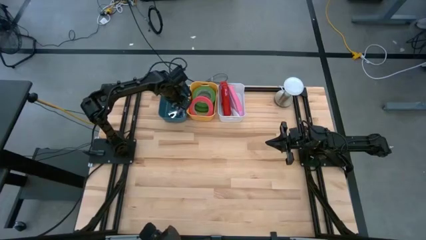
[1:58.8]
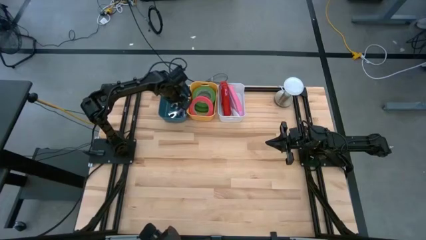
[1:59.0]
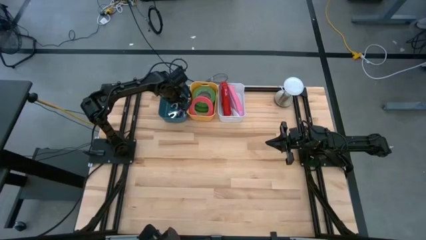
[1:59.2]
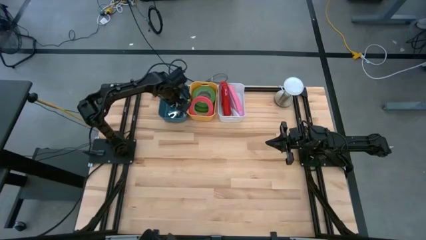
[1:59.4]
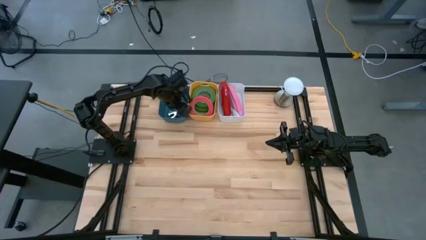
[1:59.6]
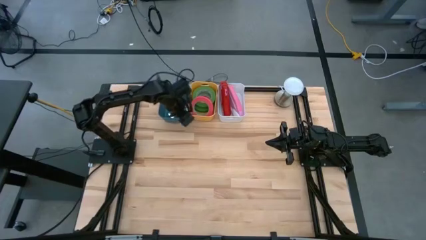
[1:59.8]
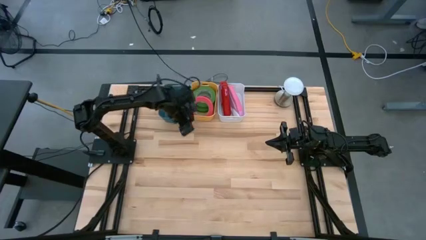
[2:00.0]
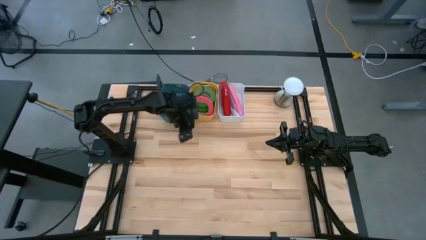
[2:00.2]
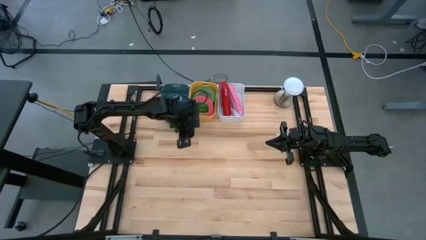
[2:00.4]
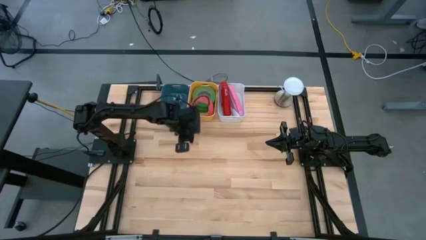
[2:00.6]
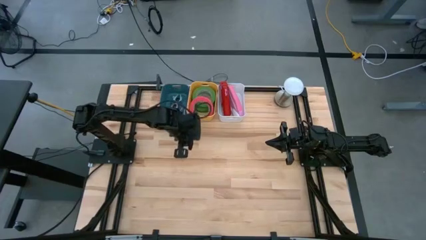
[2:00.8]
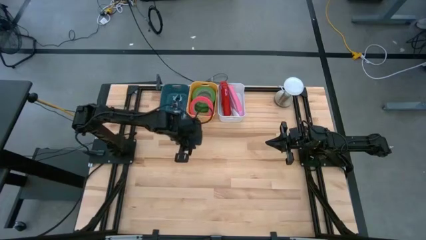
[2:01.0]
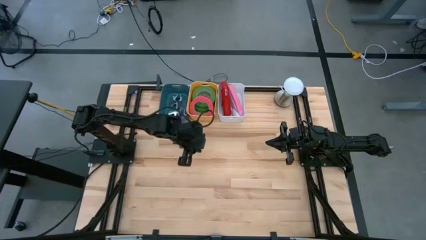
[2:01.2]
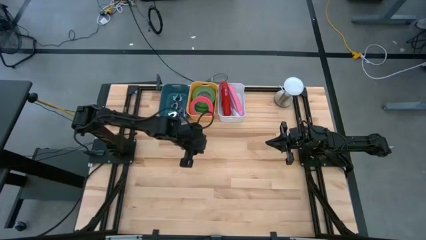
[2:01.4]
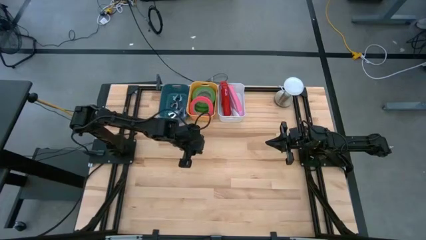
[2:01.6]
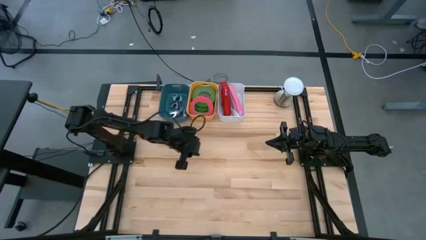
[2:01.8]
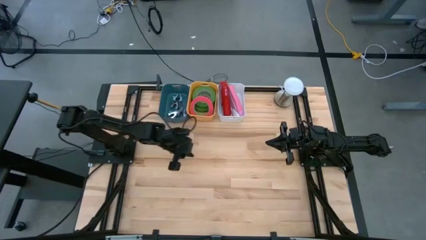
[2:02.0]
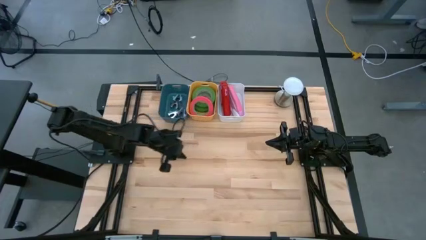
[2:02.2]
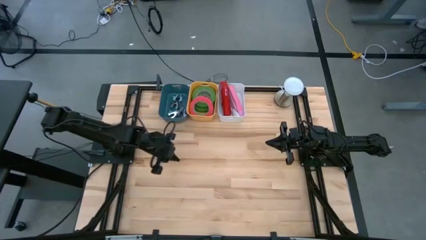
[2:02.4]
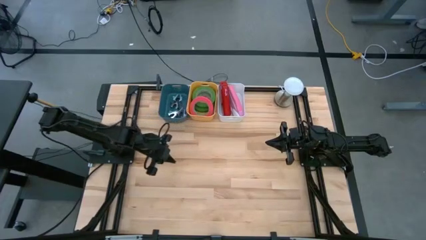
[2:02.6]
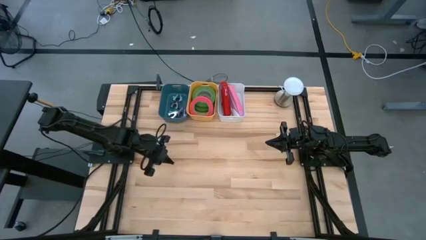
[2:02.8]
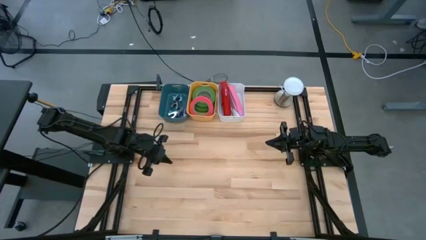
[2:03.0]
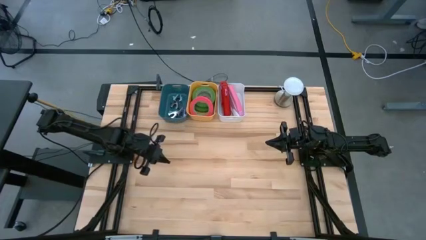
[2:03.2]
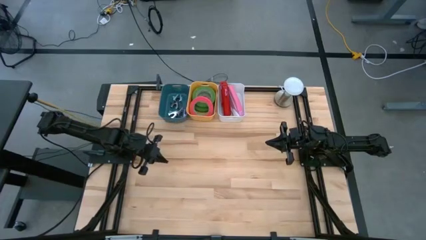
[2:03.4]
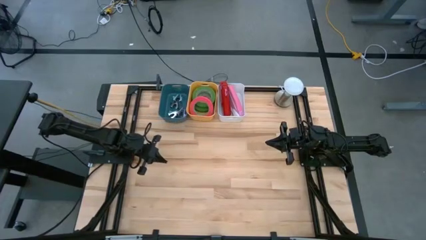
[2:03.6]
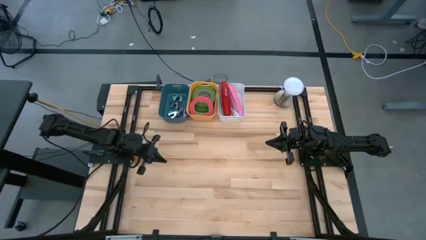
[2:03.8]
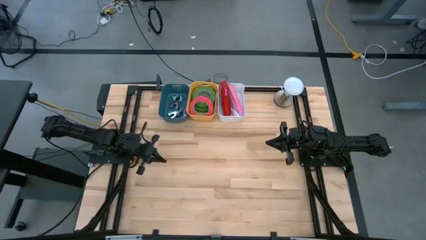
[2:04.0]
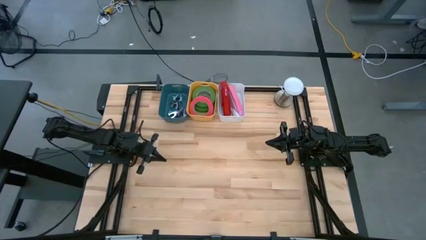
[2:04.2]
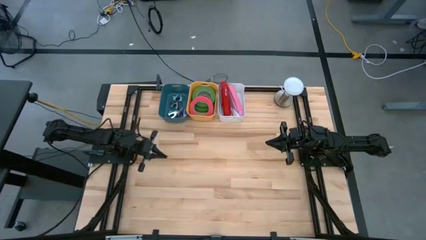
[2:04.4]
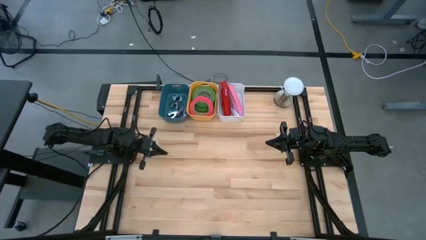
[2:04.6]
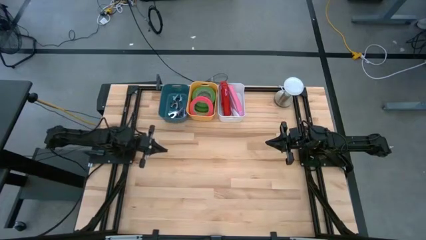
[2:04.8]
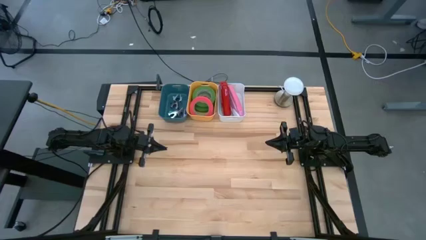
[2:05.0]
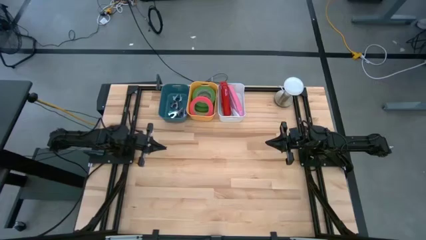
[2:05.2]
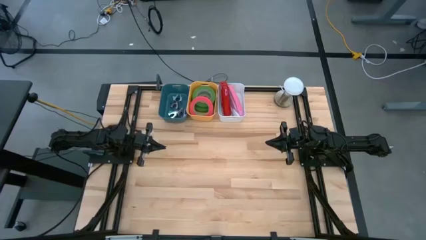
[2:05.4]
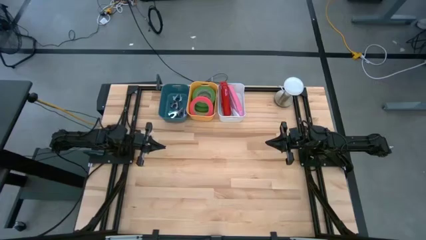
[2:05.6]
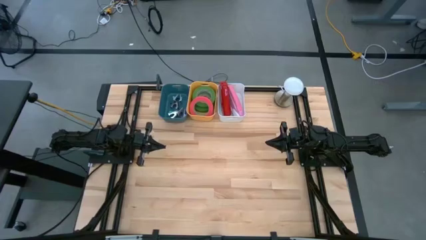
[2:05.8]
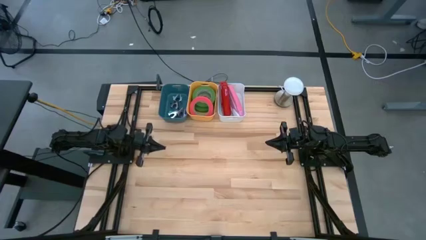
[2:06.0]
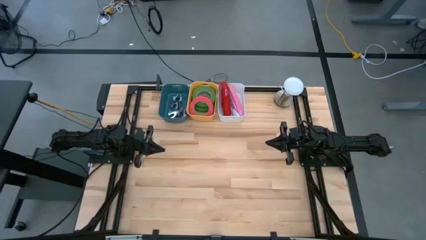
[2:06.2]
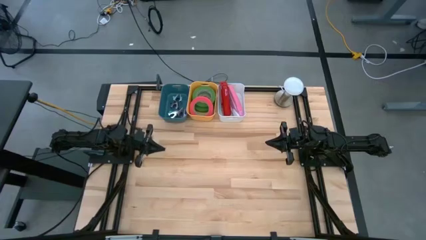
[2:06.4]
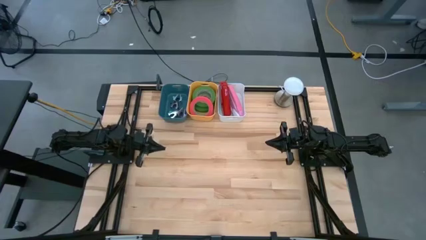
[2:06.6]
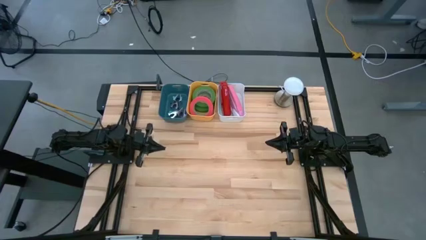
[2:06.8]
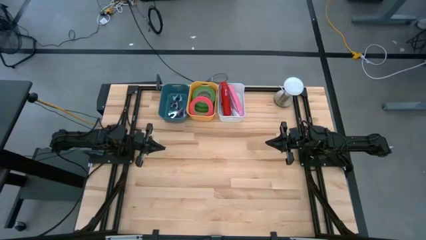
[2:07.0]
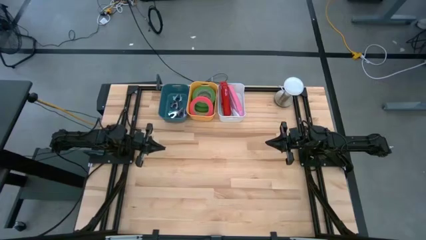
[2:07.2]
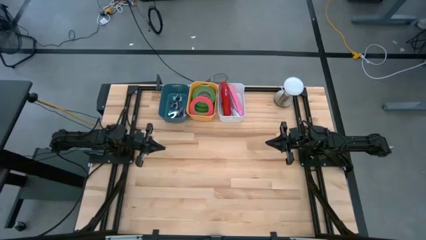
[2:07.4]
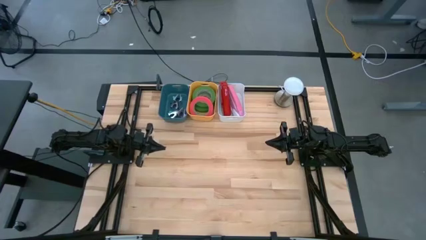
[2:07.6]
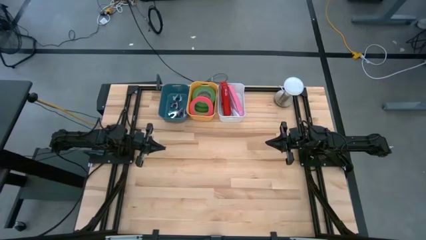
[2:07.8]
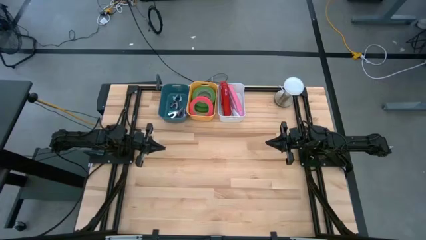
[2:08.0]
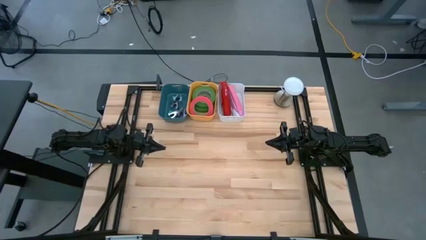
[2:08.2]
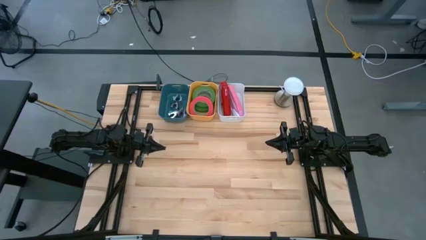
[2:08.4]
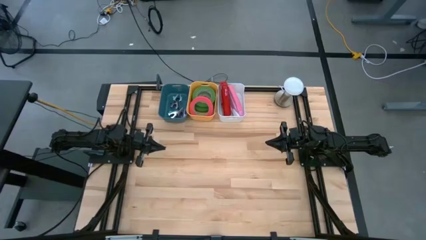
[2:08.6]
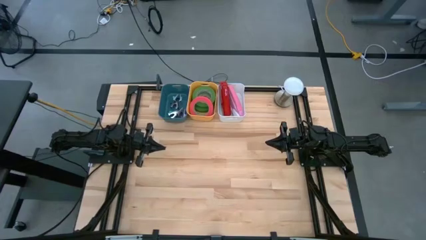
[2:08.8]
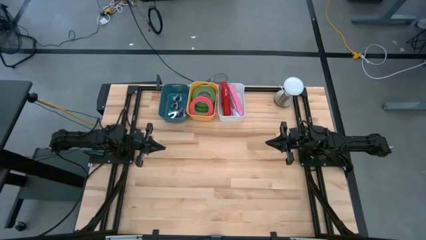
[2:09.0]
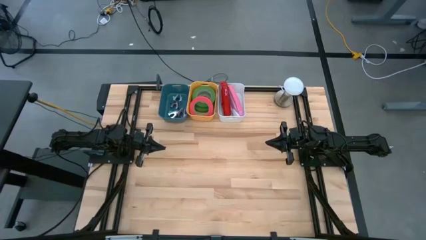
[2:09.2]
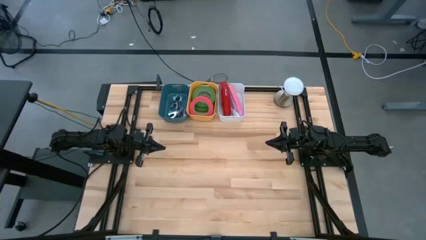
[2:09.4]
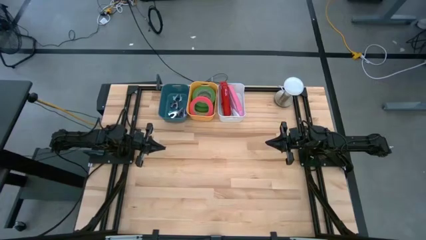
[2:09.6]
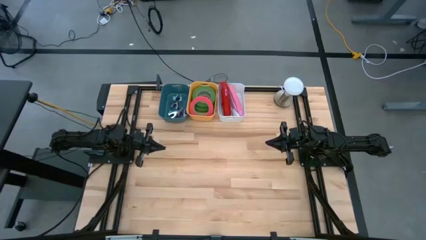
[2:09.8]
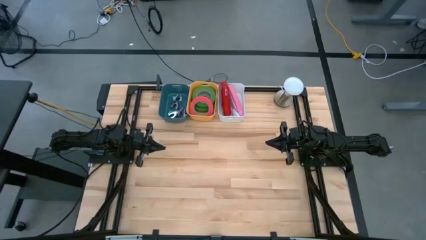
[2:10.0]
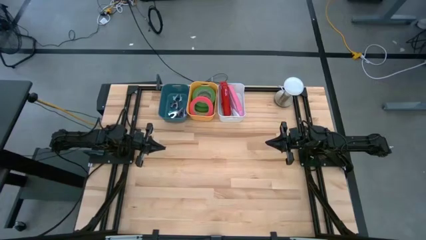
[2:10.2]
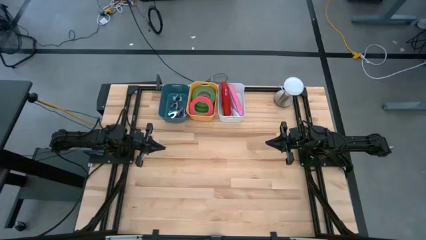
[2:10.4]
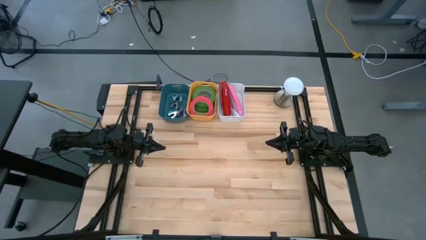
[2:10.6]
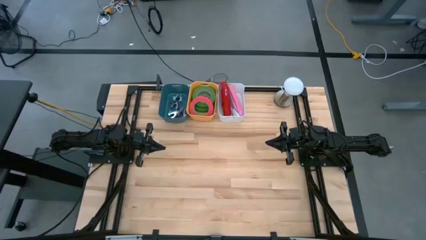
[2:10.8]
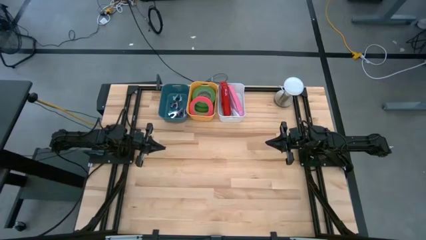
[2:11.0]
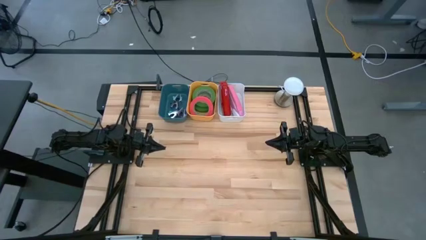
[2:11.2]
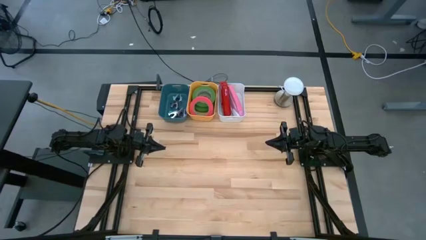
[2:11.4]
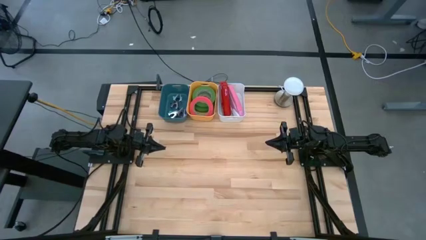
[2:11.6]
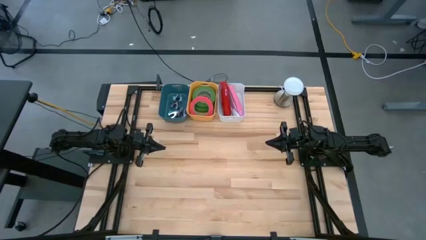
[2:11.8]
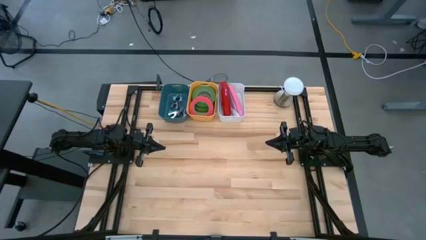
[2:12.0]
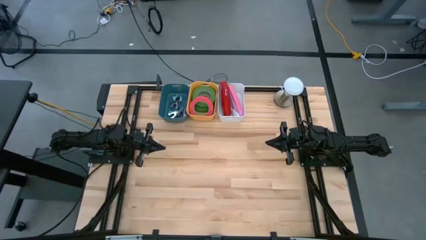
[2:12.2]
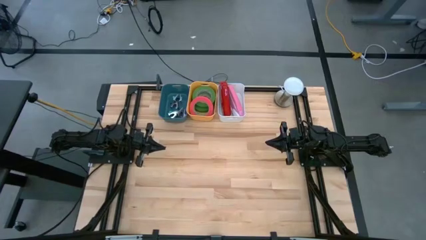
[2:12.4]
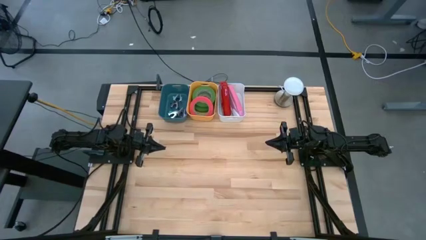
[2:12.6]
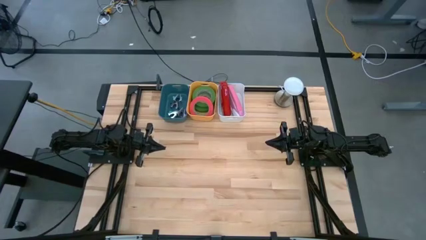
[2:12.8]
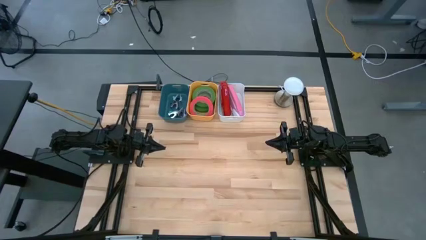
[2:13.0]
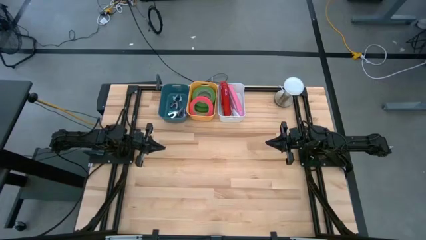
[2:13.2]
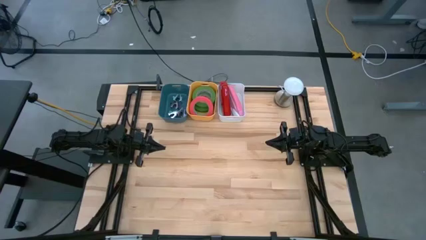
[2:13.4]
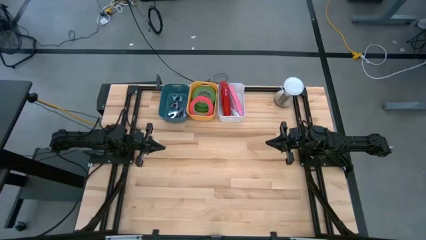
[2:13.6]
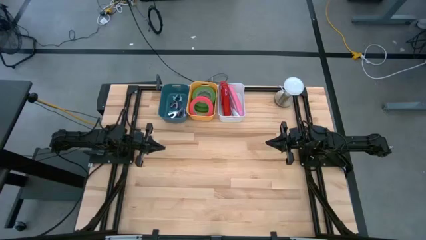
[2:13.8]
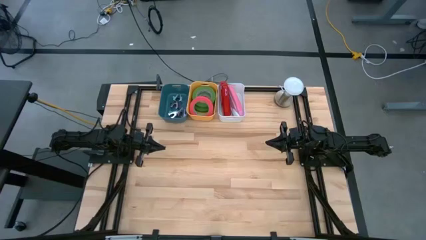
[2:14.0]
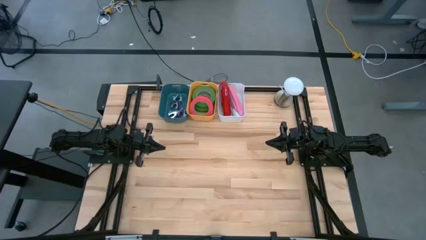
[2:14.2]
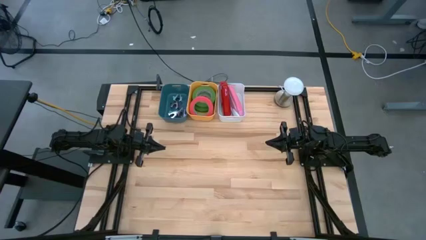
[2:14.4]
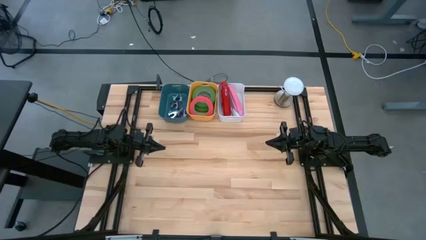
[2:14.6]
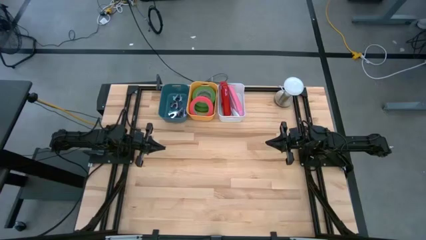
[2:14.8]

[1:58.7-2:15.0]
Task: Pick and place Stapler, Stapler remover, tape
Return to Home Position

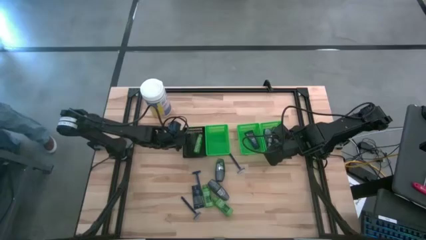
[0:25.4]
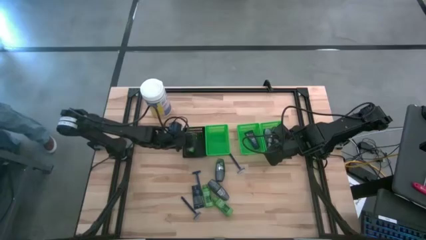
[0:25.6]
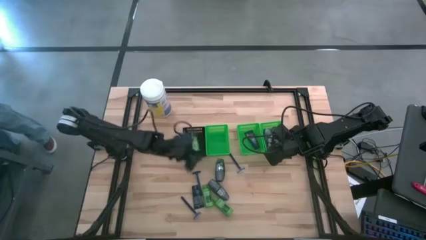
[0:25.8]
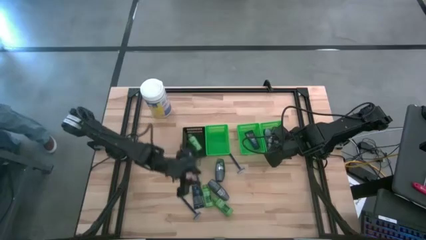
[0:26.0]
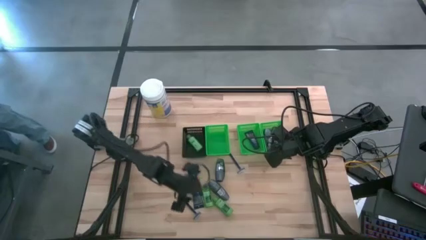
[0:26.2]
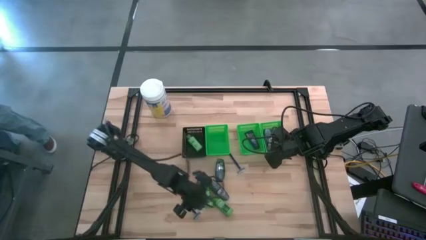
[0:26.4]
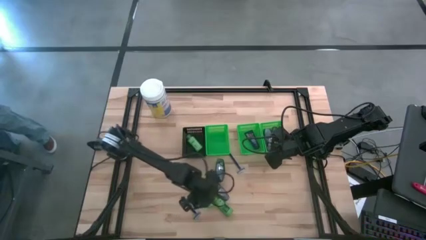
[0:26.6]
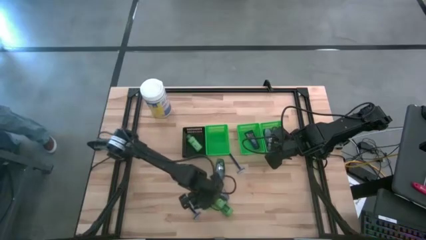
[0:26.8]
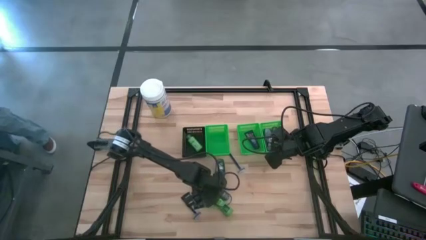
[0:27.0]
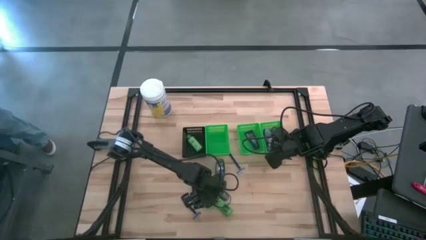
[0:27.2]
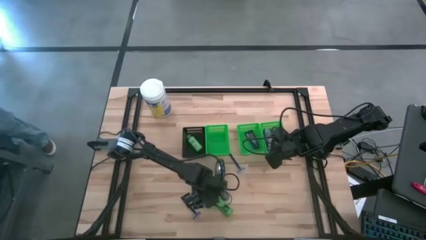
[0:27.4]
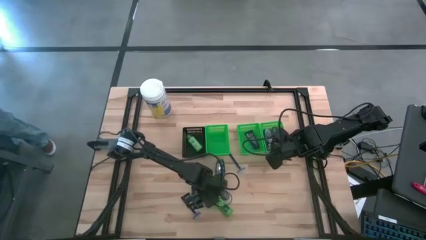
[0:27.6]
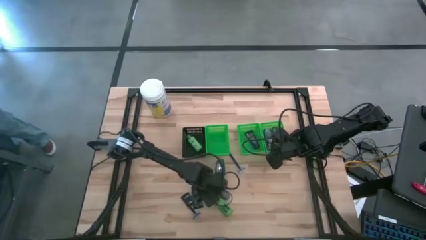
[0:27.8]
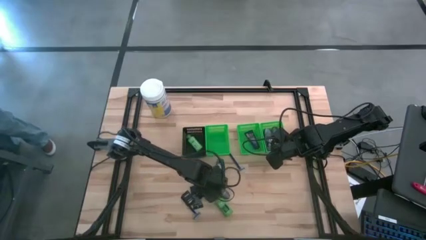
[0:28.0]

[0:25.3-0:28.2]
Task: Pick & Place Travel size toiletries
Put the green shampoo into the black bin
